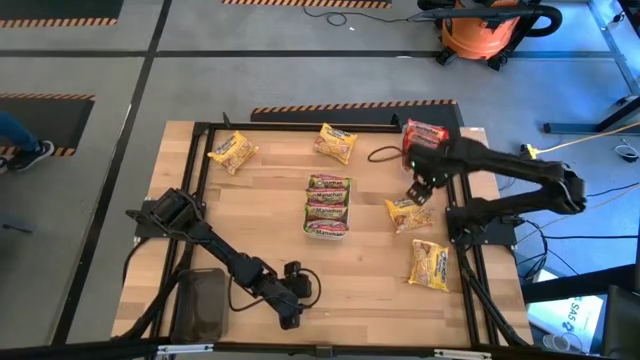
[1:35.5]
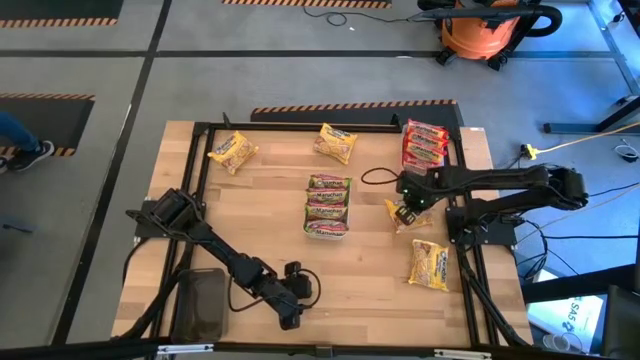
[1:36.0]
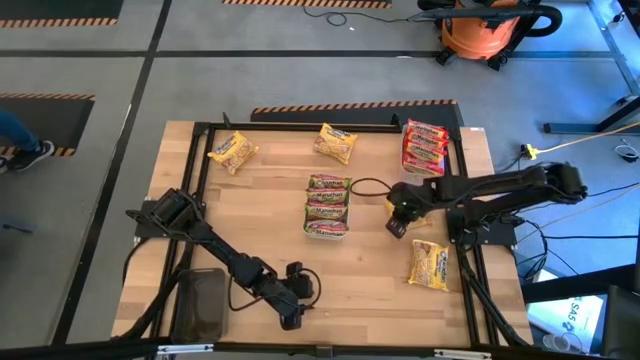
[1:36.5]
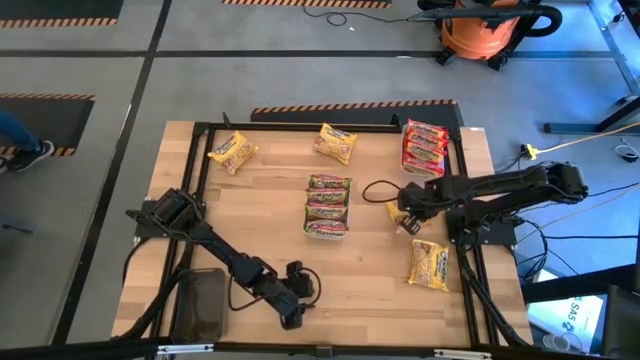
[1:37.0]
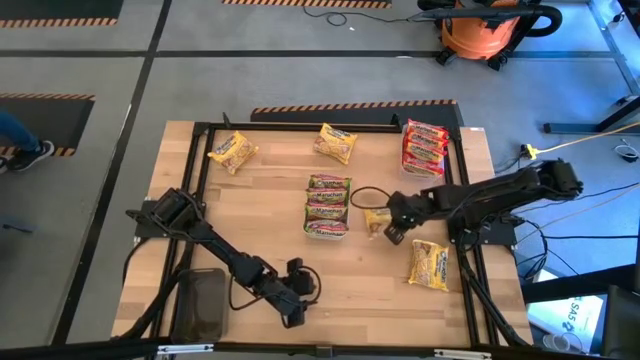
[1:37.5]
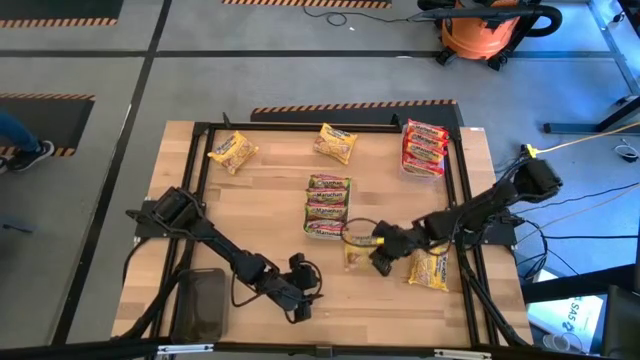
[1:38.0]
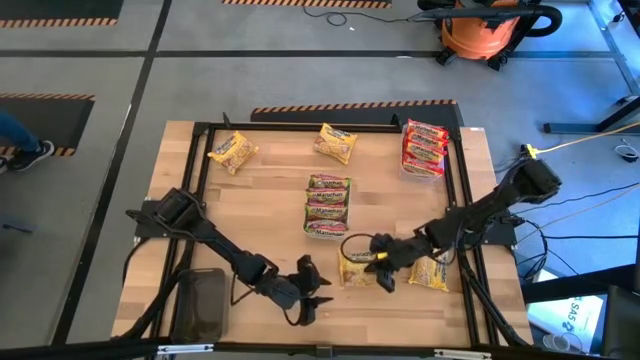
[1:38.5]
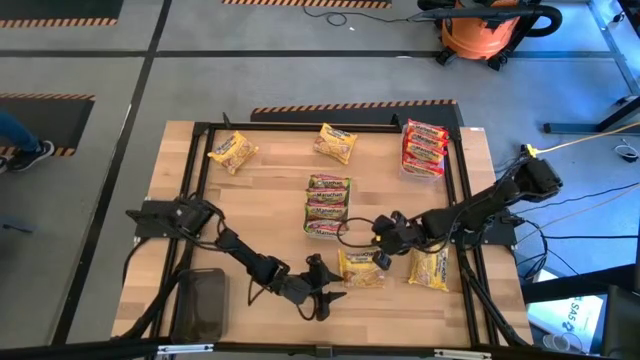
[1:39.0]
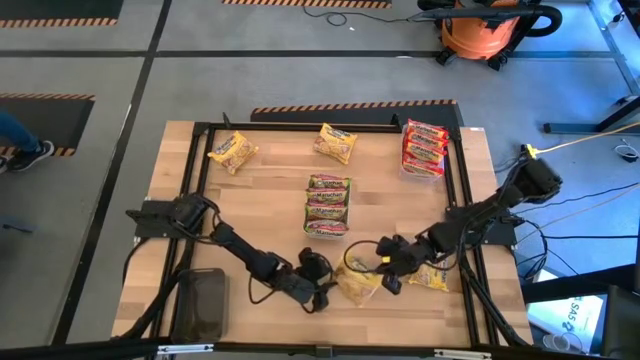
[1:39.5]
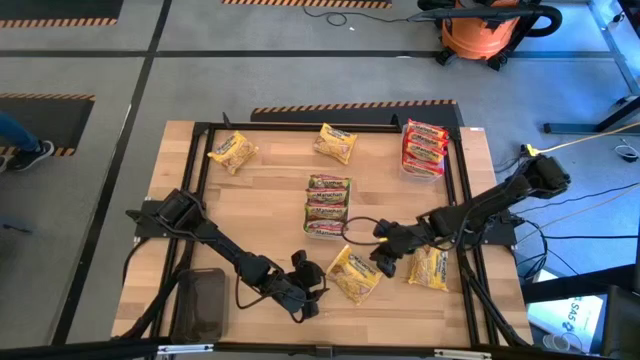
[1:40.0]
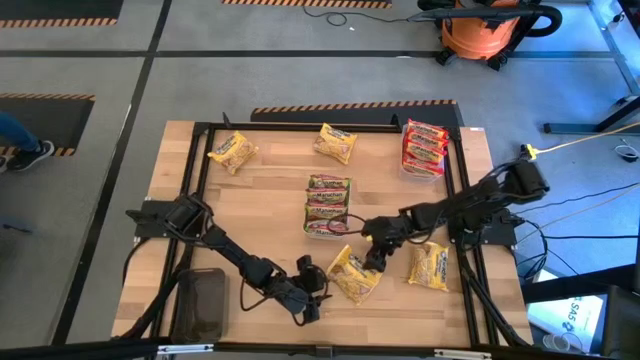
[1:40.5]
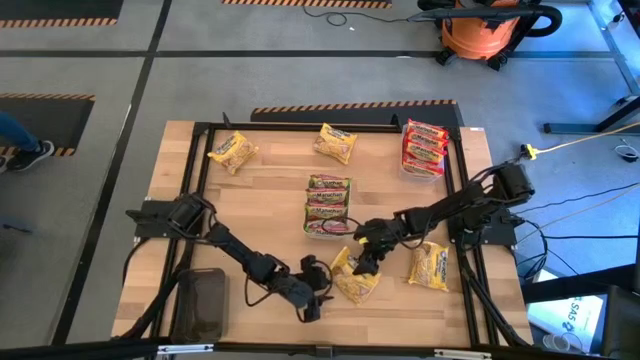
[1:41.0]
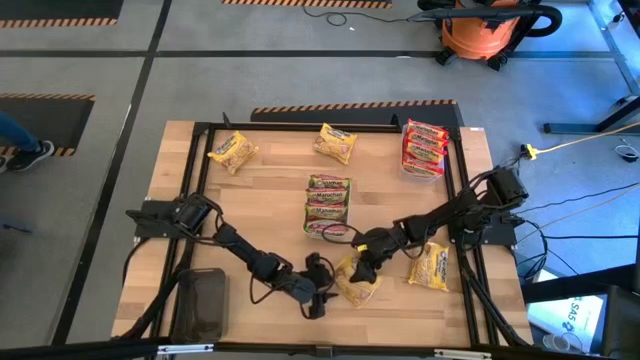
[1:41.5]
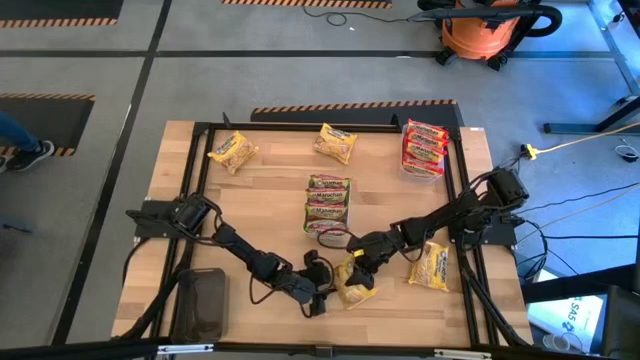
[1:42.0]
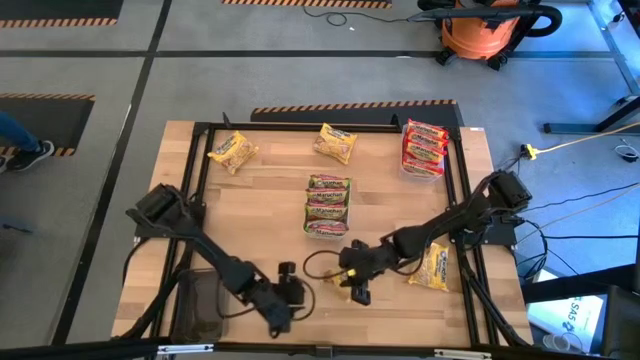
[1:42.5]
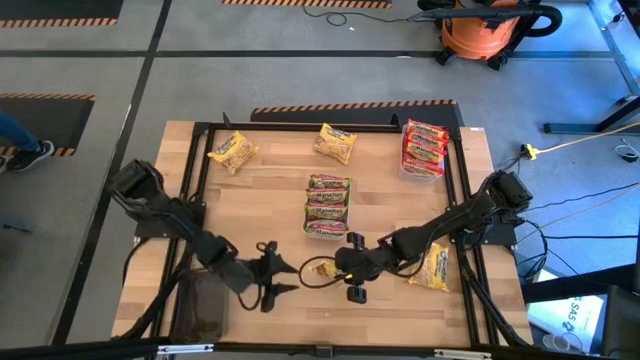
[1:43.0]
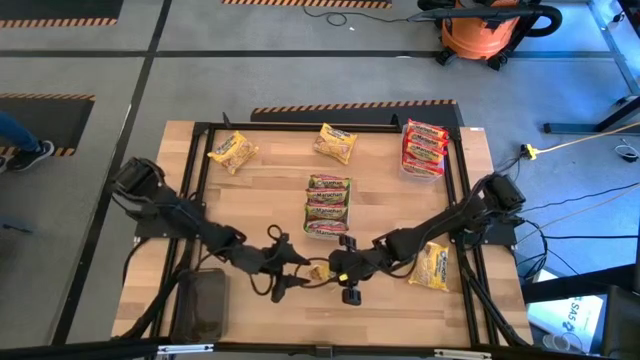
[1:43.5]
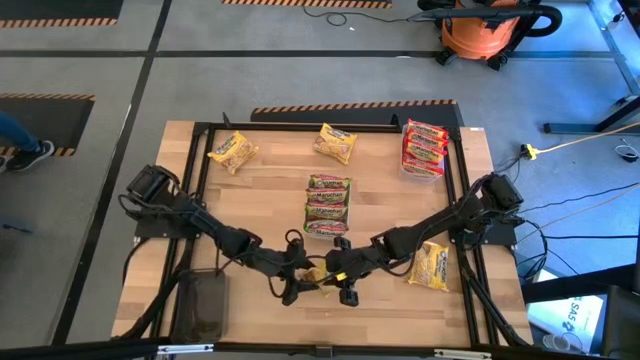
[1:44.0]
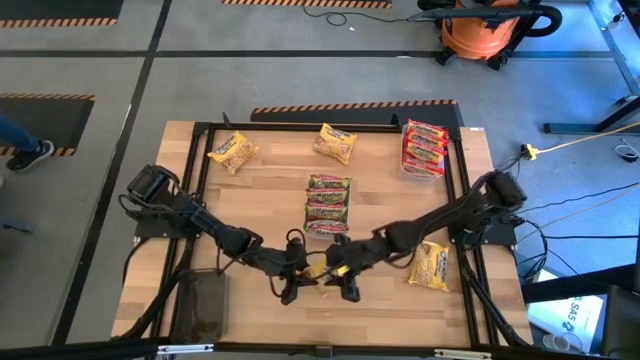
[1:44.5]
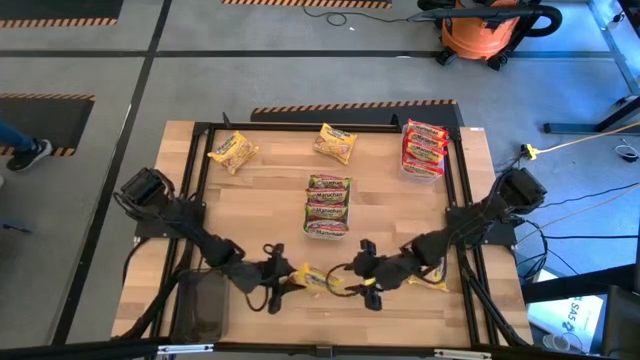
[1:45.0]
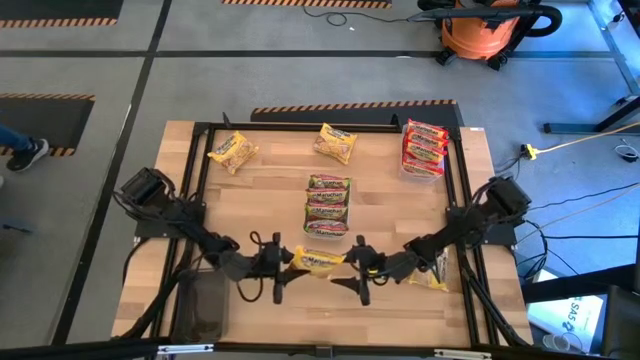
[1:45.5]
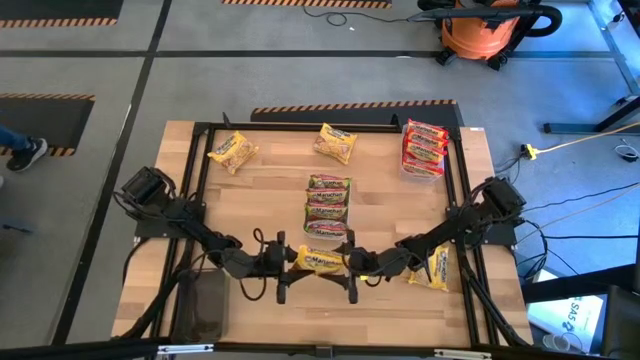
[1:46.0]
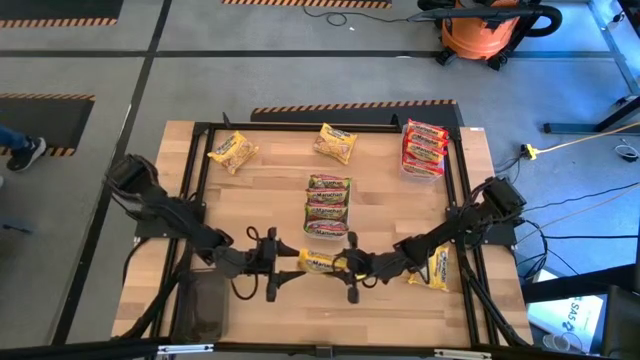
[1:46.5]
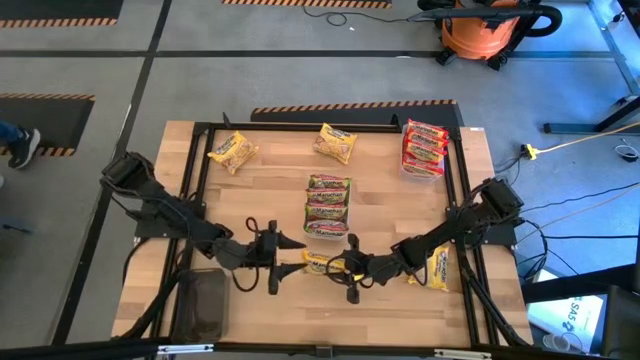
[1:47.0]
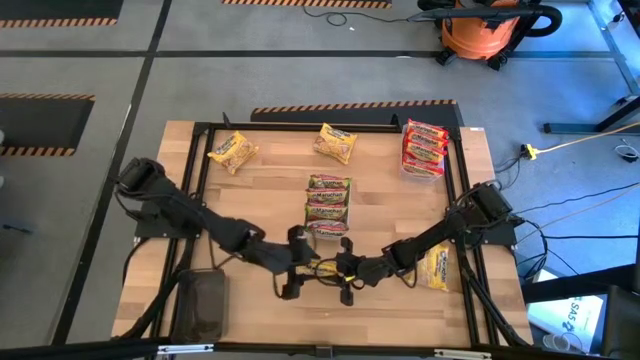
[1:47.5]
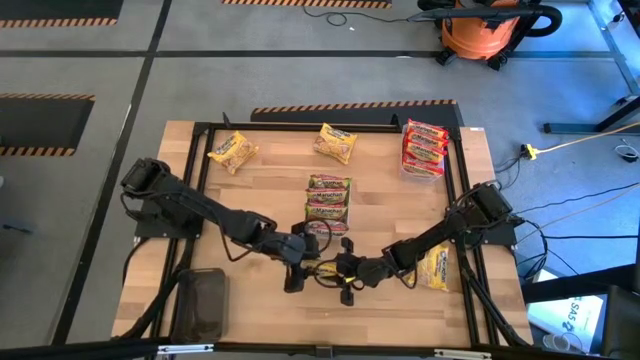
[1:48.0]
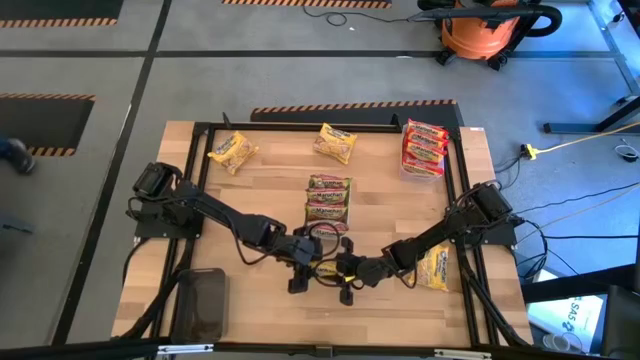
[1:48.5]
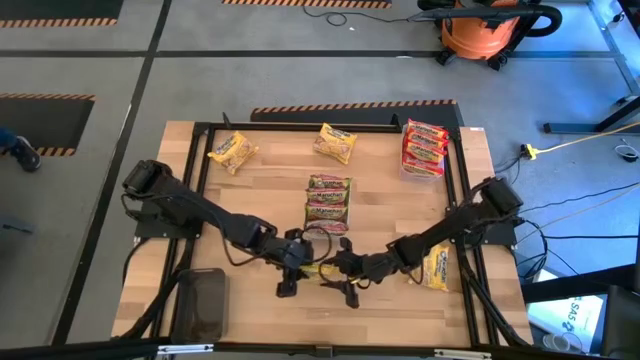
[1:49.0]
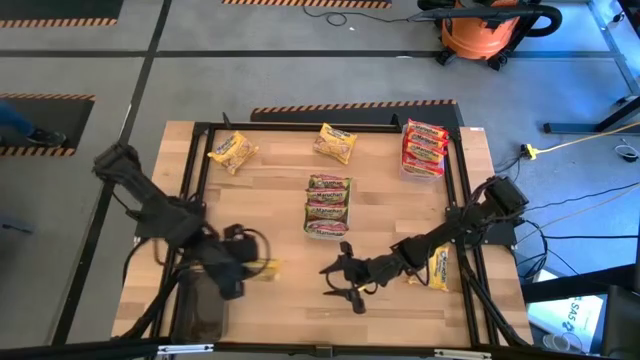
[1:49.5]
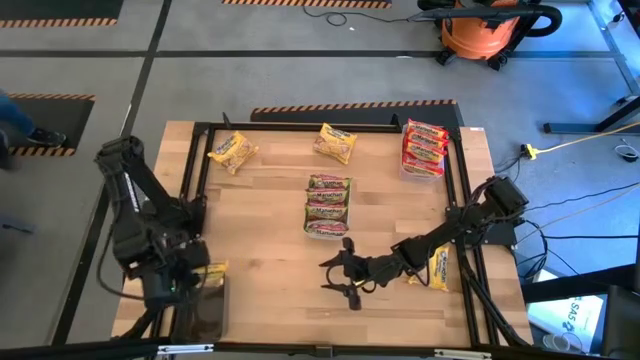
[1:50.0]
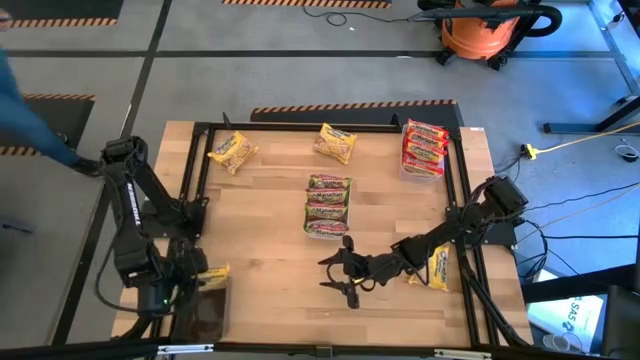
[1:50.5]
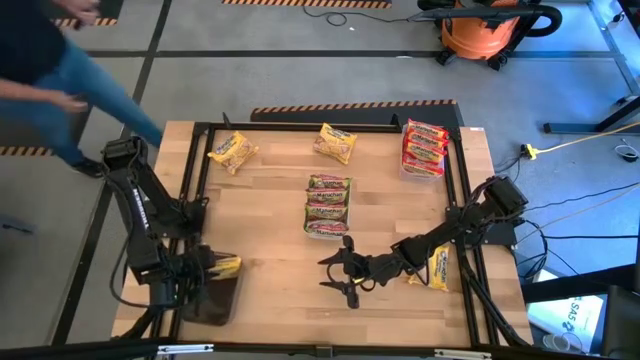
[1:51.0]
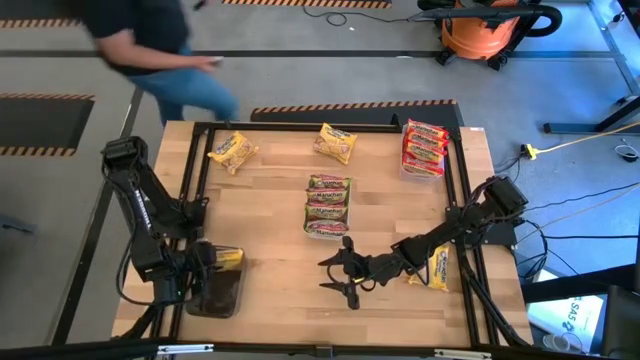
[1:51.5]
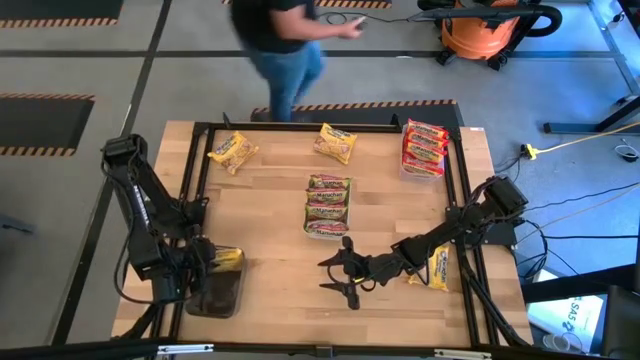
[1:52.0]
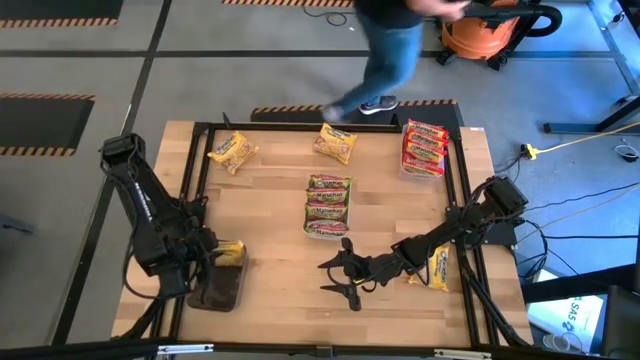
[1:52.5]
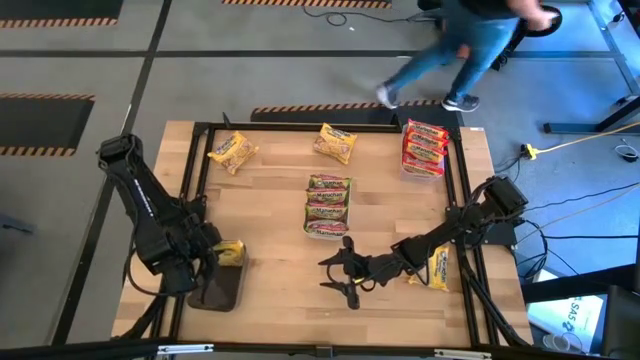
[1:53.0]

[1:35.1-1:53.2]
Task: Sort Maruchan noodles
Put the yellow noodle pack into the black bin

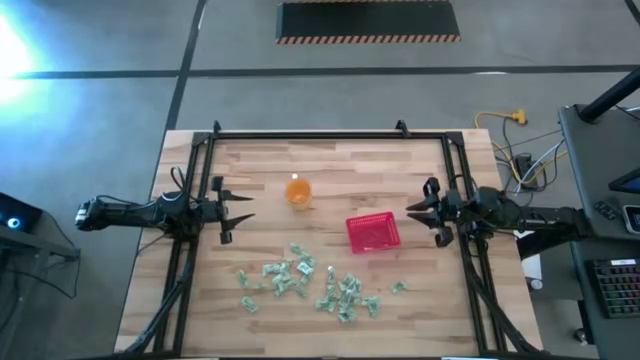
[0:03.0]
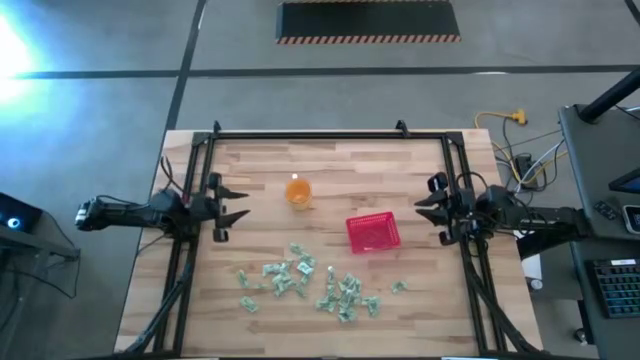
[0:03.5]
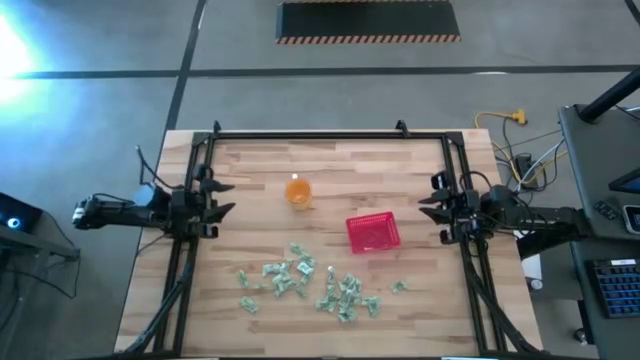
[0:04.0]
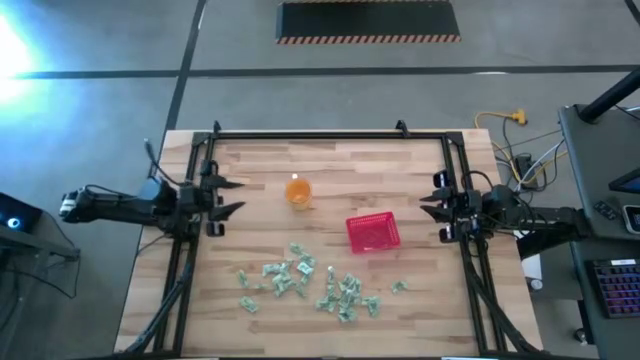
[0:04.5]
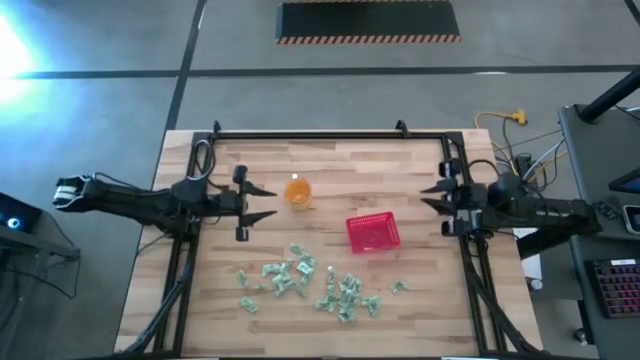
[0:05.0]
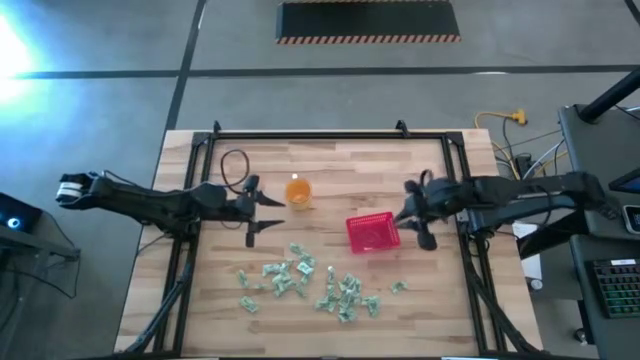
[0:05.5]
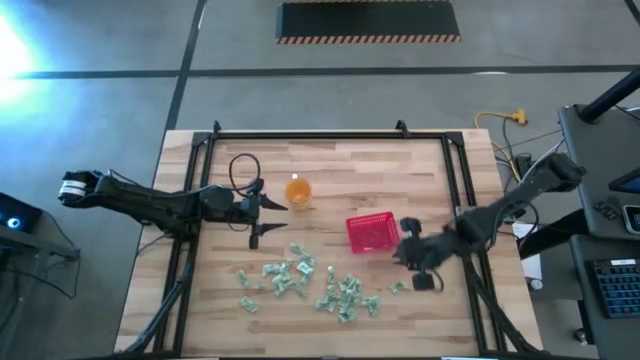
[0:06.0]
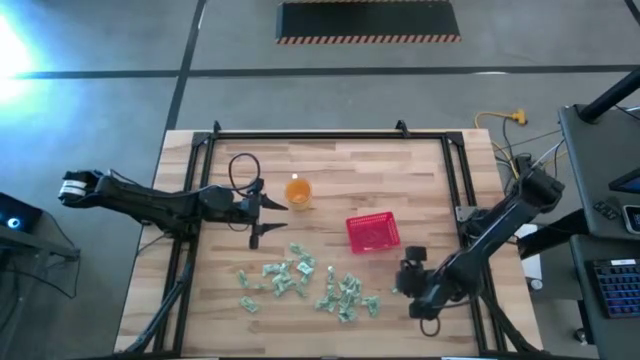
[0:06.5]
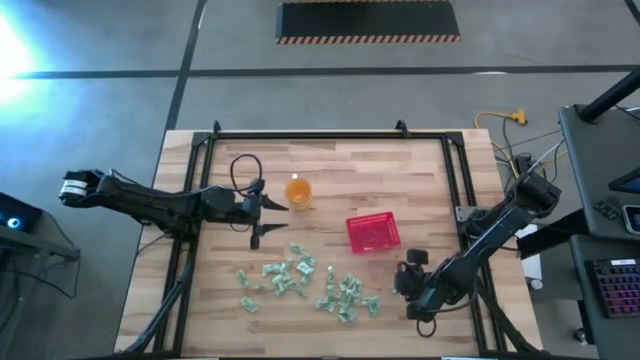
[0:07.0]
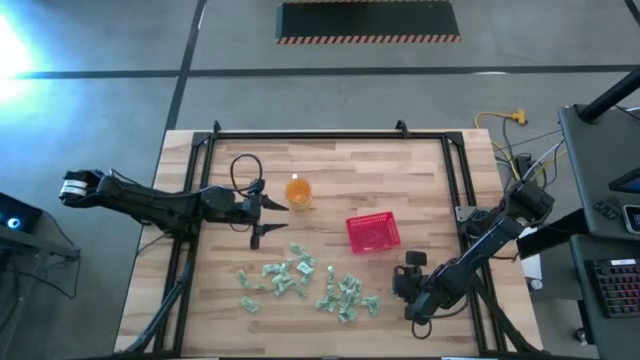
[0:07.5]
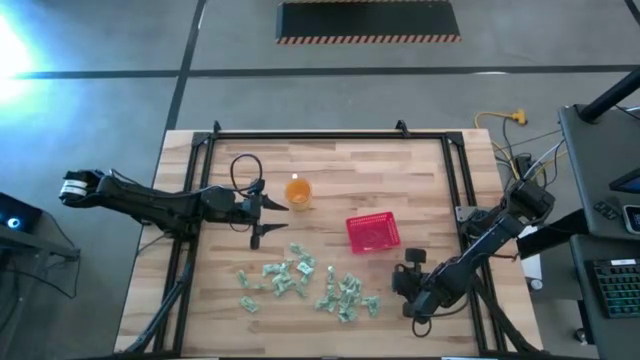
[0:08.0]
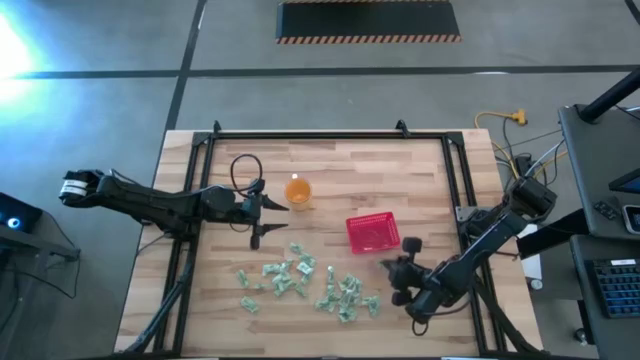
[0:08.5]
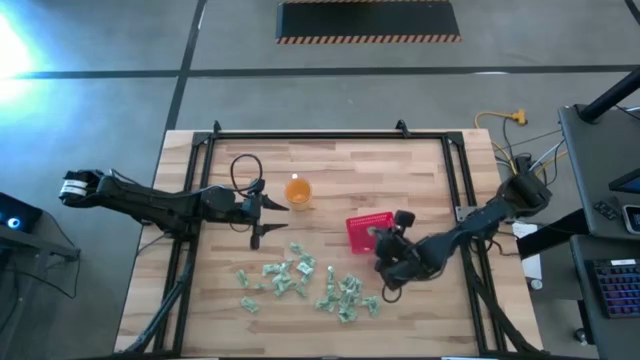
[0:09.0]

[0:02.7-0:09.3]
Task: Pick and place Stevia / Truvia into bins
Put the stevia packet into the basket
